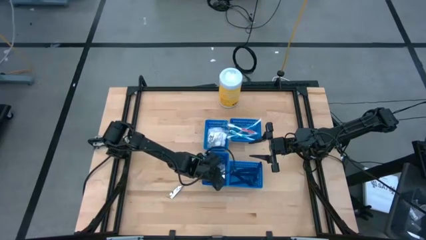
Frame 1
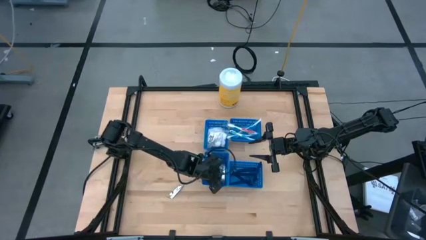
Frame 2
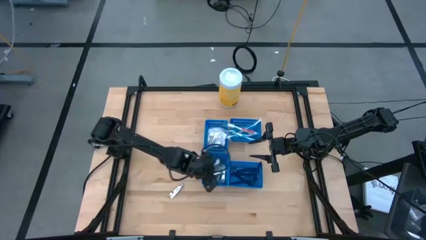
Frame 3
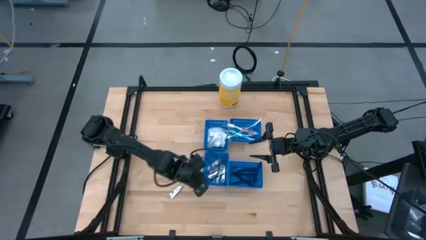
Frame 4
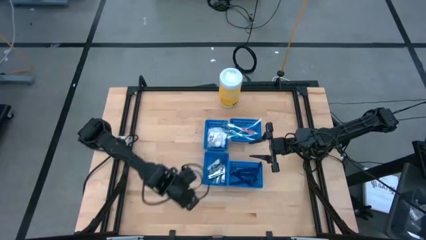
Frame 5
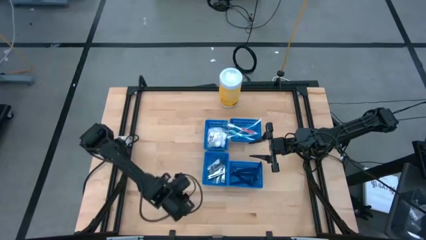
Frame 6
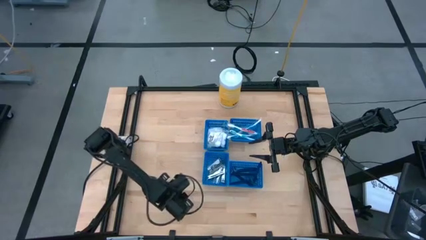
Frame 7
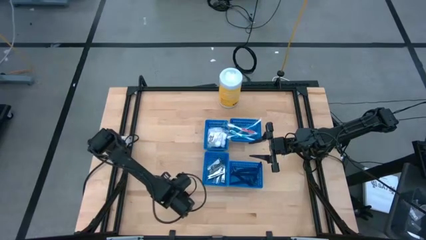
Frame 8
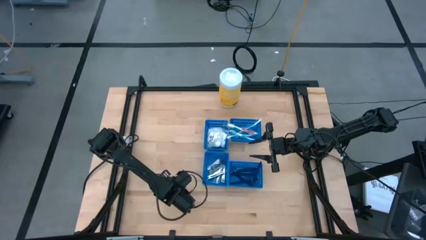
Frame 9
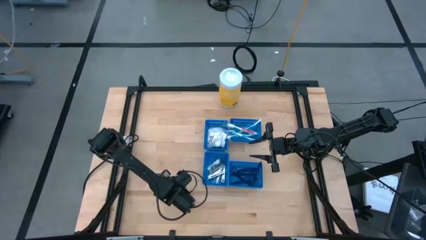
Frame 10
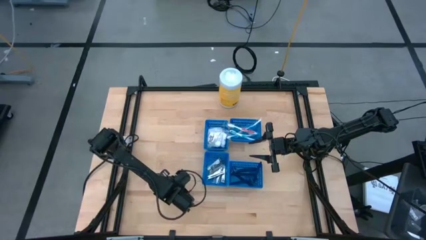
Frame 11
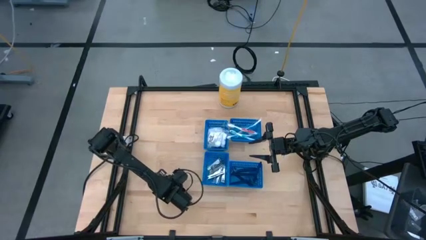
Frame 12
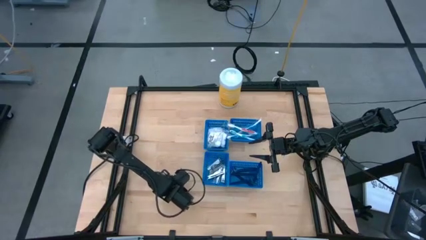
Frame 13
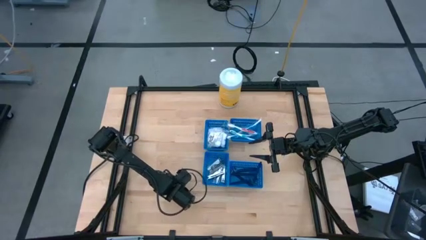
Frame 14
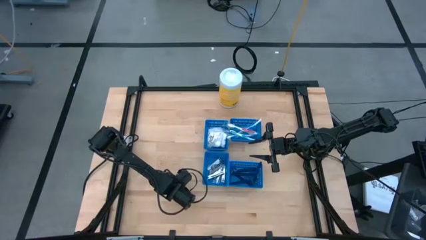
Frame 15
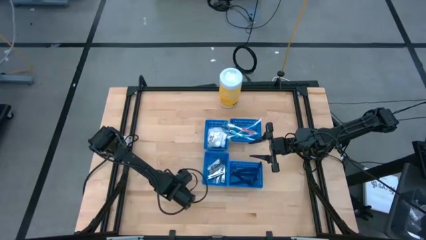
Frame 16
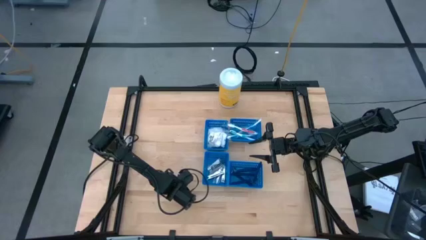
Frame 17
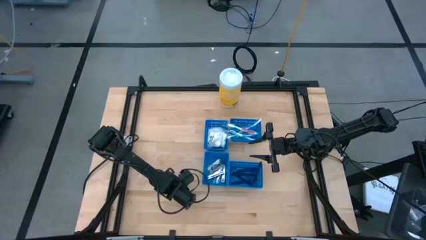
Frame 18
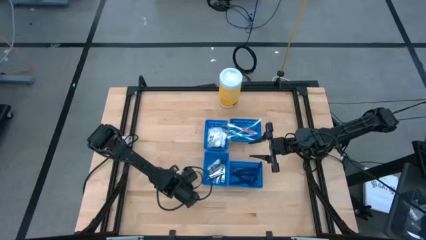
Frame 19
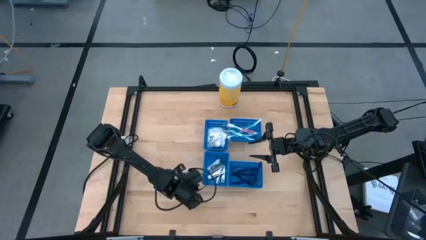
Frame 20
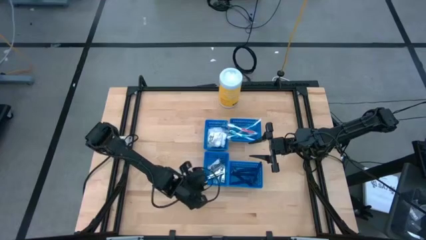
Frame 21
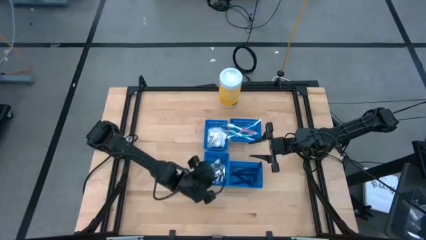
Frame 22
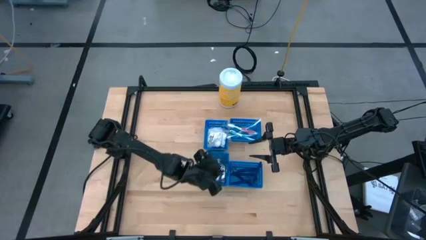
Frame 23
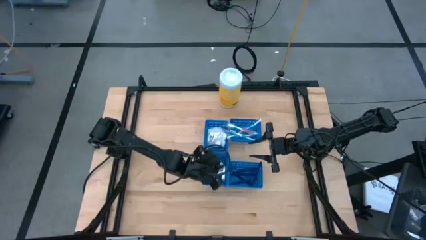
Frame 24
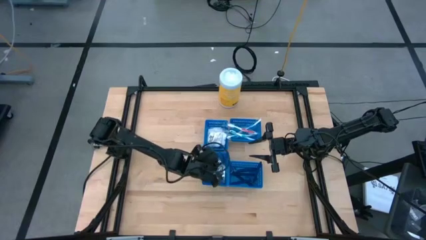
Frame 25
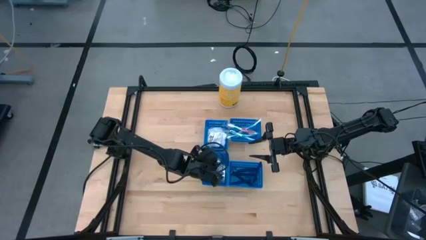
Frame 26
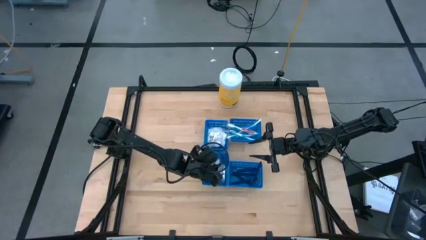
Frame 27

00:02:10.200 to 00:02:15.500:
Task: Pick & Place Travel size toiletries
Put the silver nail cutter into the bottom left blue bin

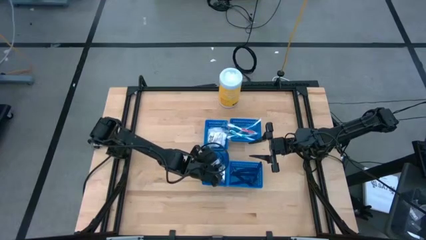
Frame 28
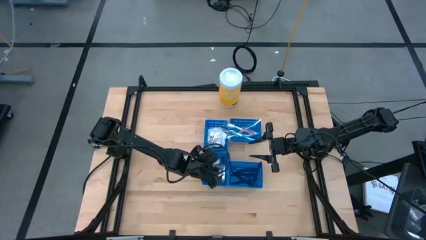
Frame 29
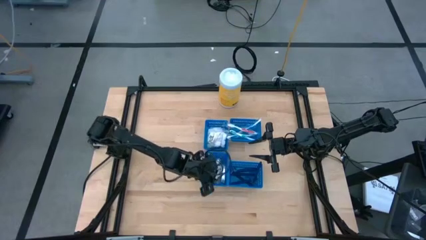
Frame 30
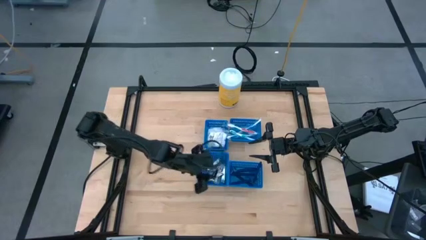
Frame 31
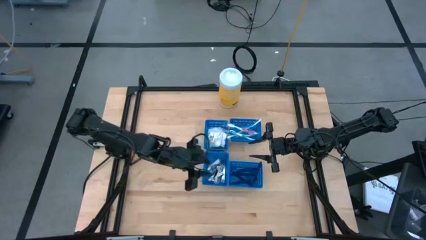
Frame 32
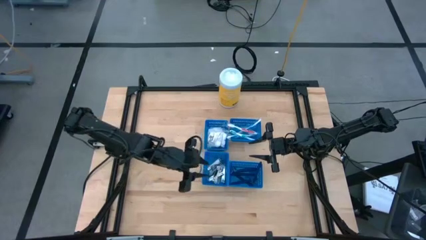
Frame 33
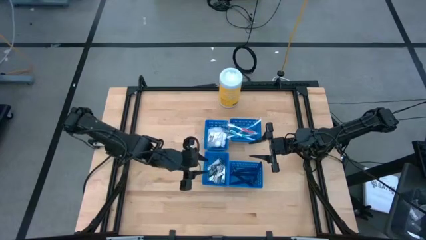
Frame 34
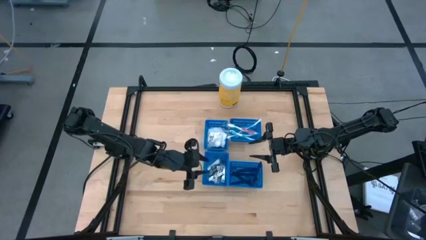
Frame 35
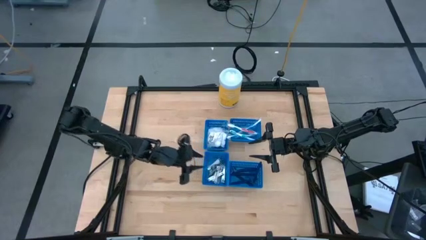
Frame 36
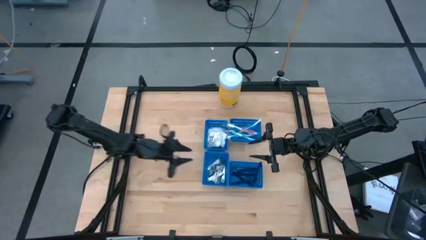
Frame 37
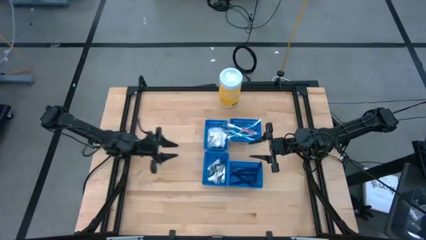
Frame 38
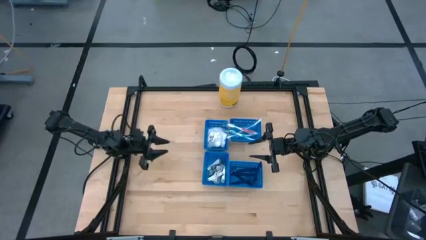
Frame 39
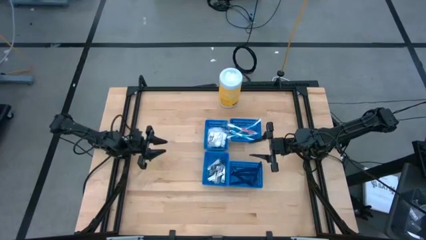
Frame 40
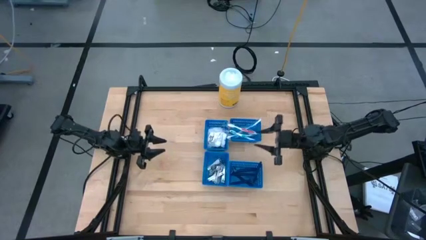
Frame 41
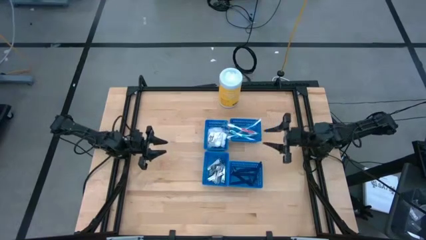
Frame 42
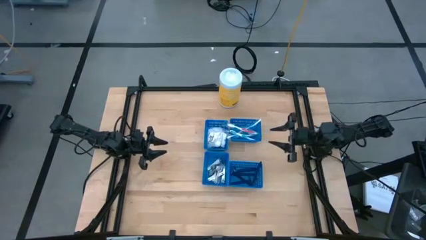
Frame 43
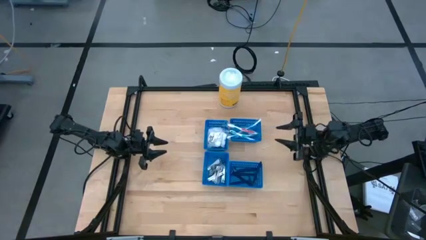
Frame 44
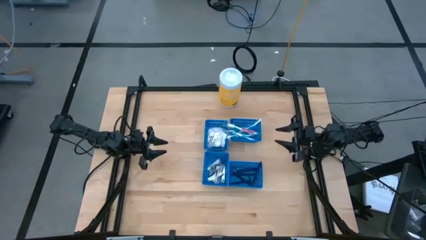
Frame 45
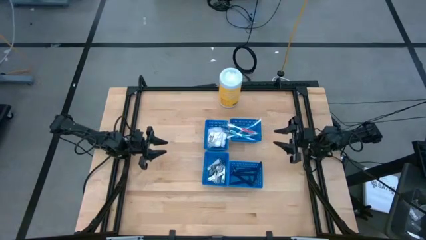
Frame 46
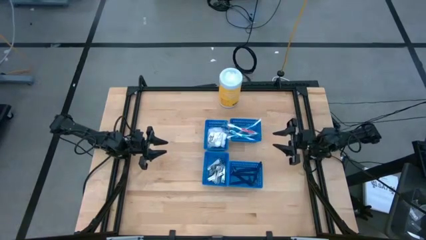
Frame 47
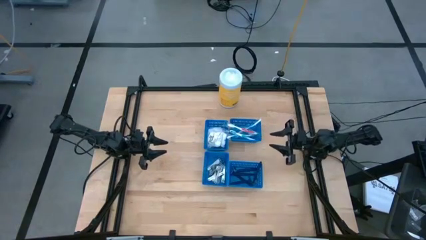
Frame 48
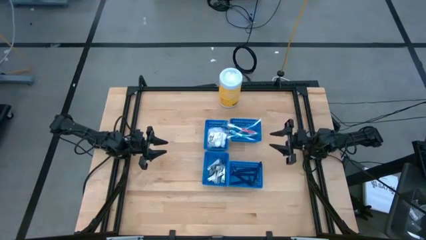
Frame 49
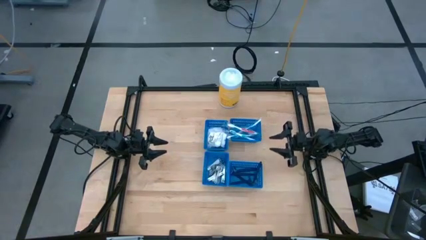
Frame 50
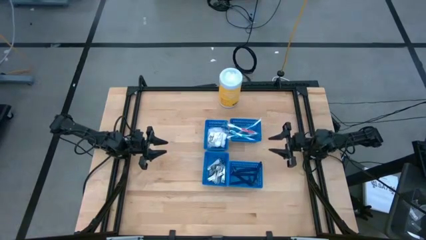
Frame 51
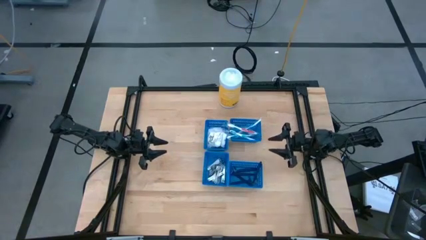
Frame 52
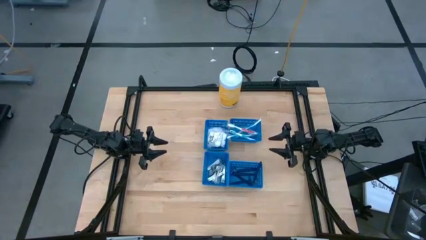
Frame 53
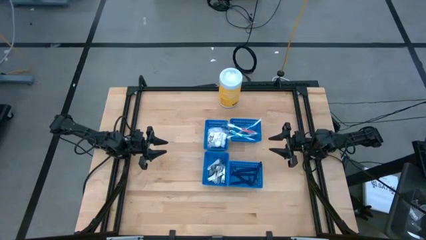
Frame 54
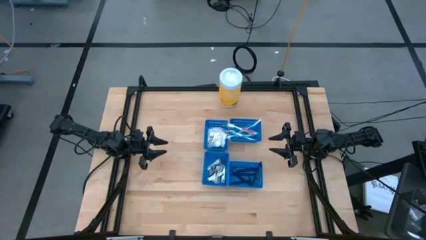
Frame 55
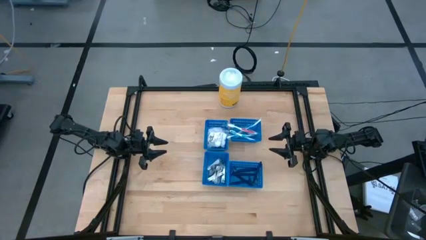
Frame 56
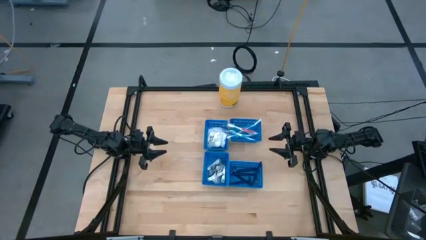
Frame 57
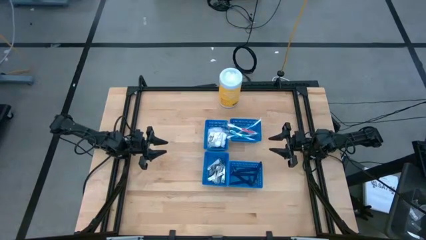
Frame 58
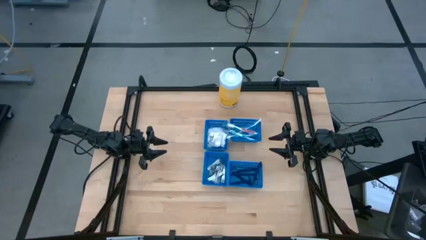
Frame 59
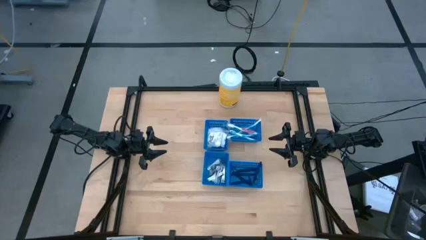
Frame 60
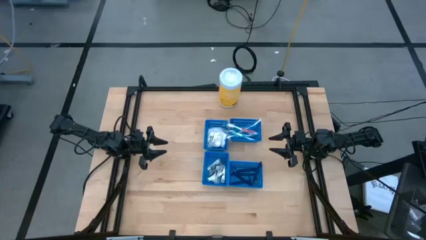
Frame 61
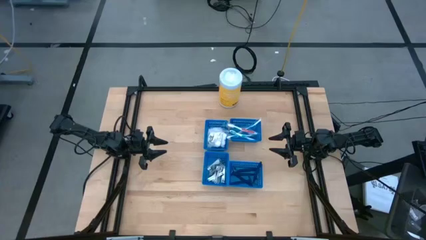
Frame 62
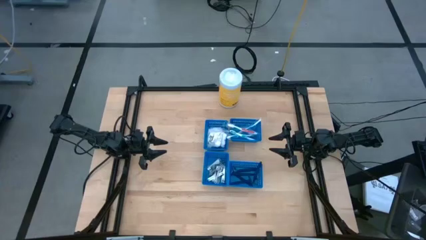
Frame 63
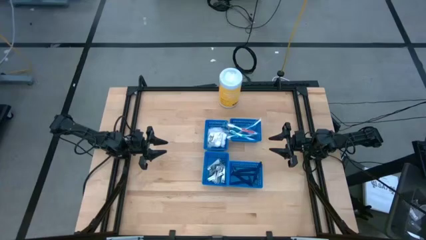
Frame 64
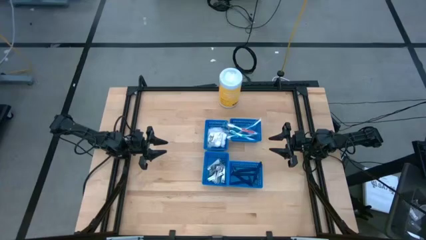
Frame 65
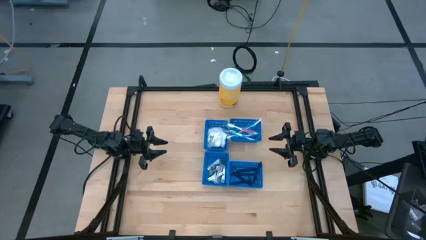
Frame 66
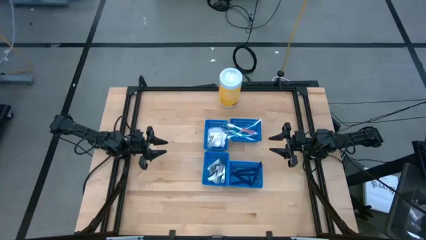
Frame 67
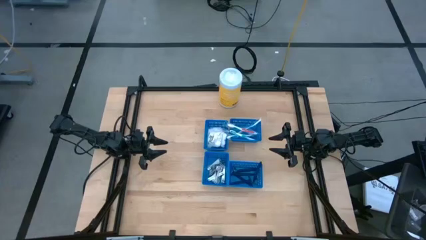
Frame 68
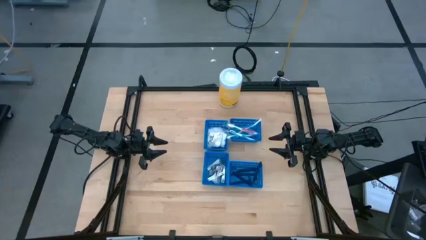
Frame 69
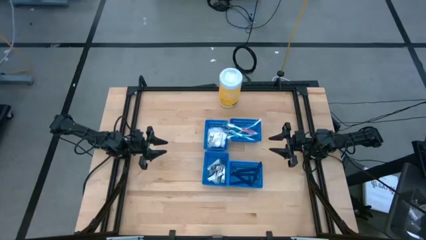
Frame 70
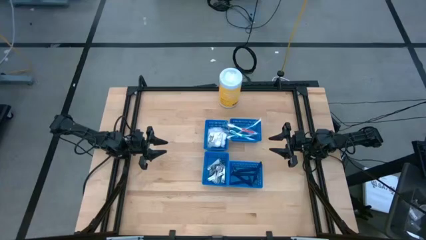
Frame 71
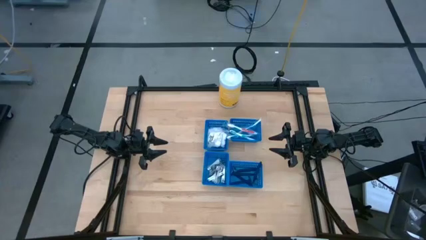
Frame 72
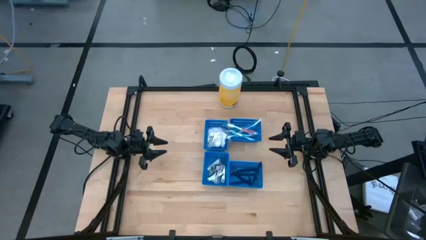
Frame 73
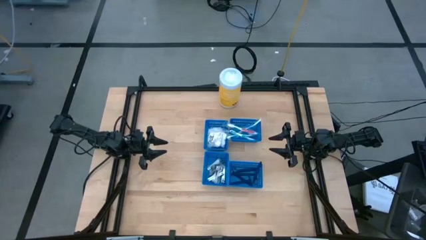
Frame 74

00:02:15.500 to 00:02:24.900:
Return to Home Position
